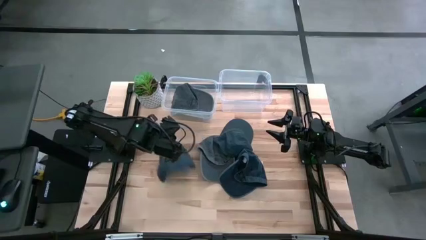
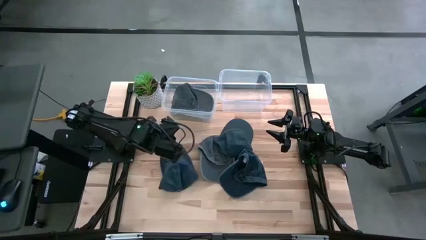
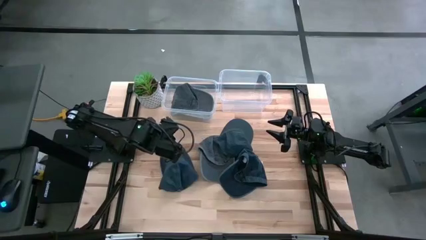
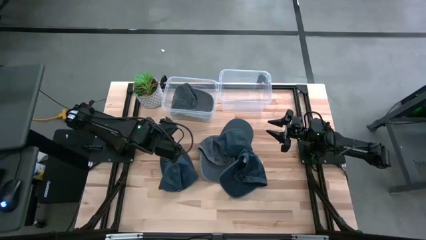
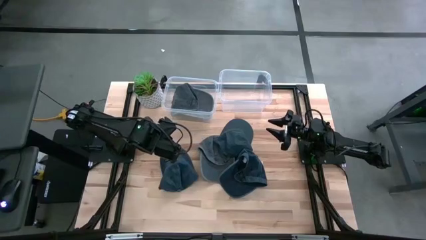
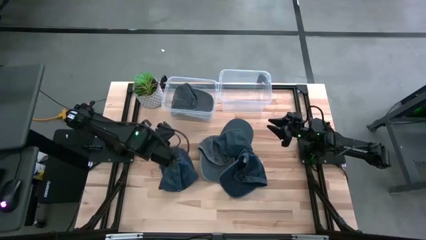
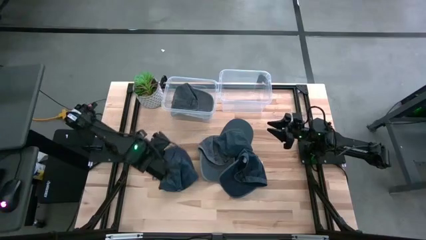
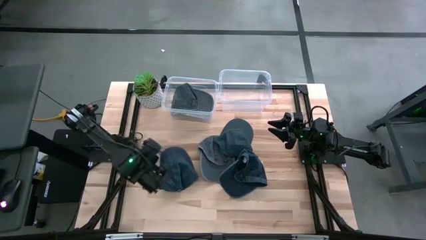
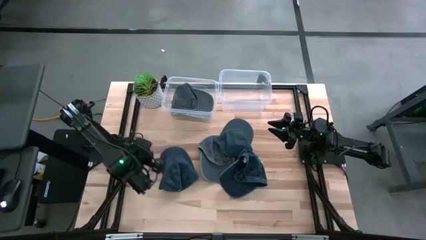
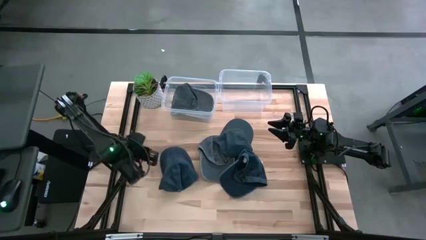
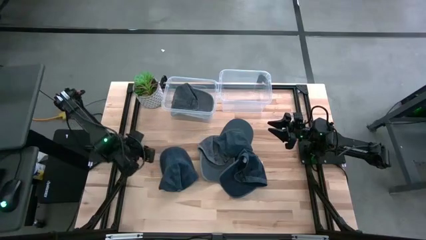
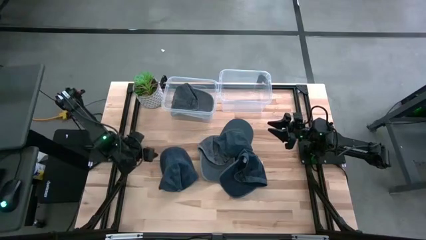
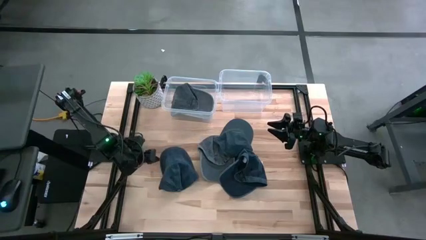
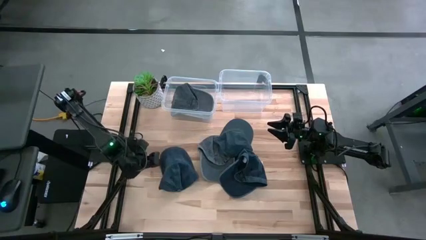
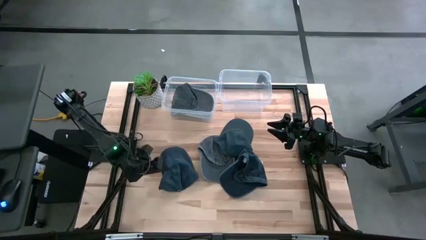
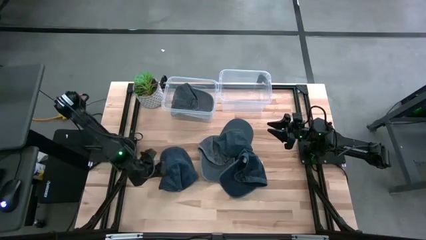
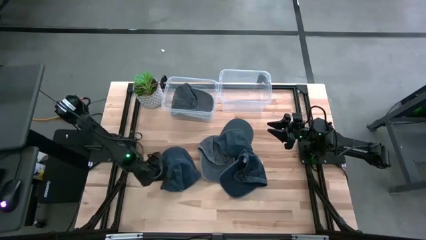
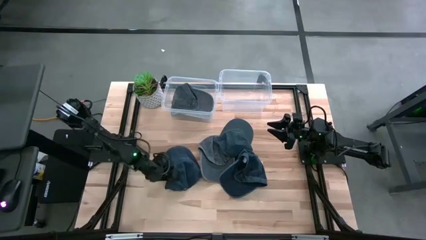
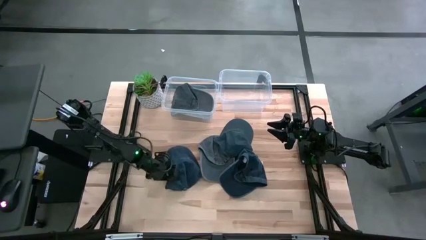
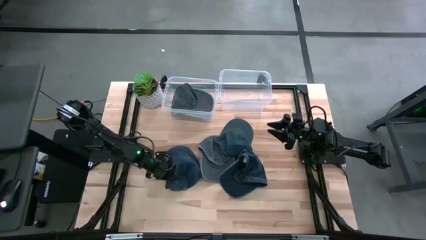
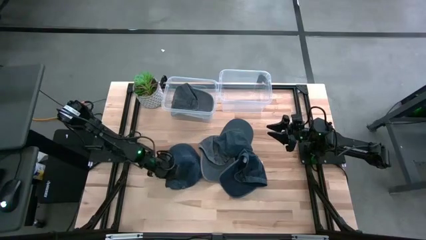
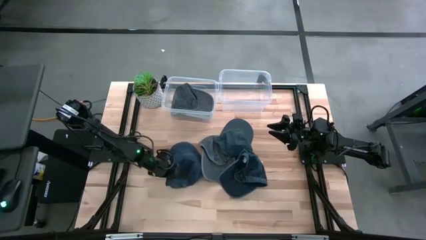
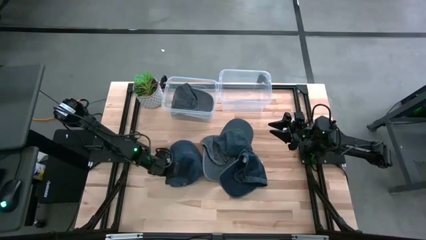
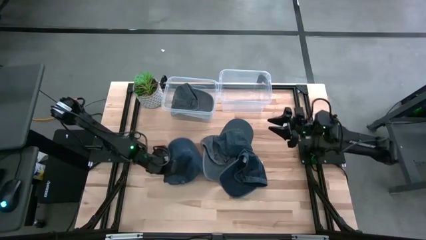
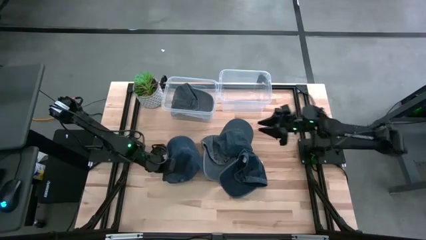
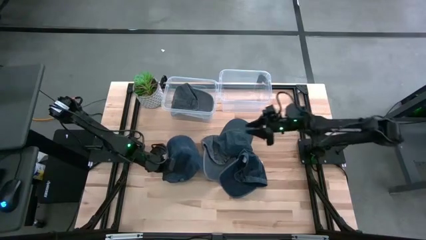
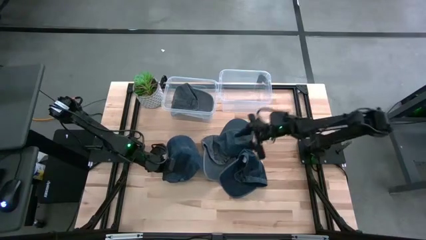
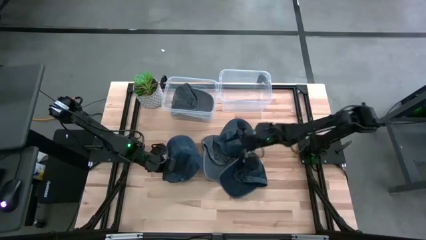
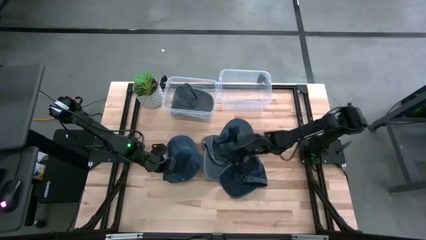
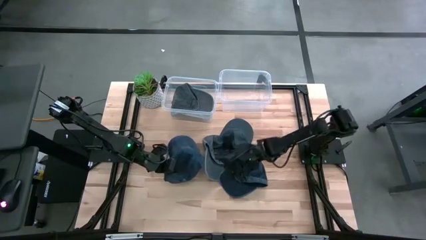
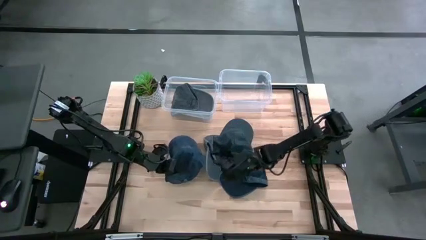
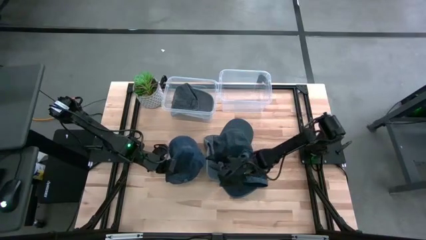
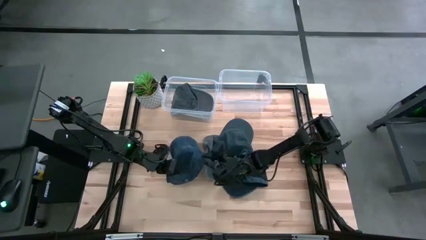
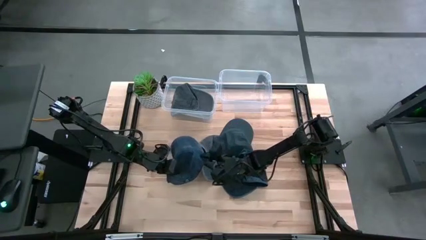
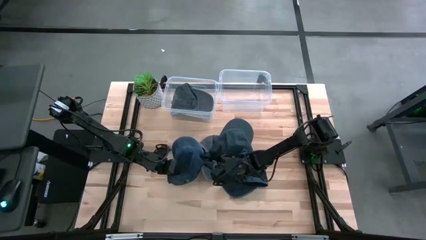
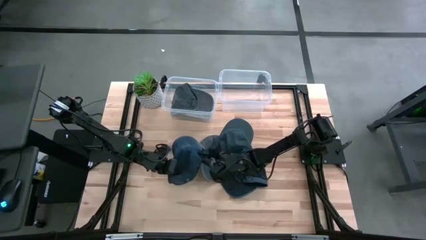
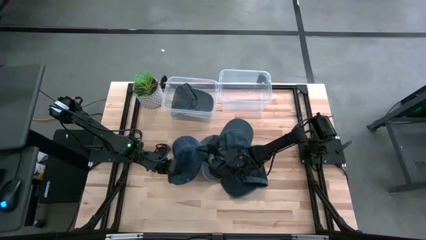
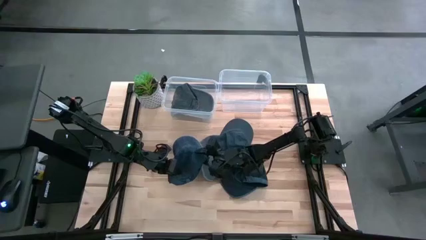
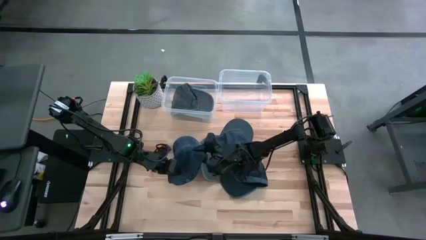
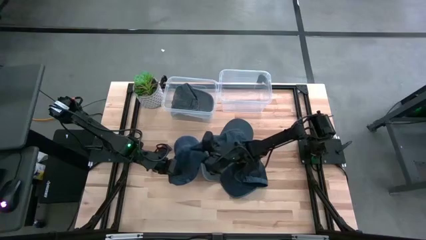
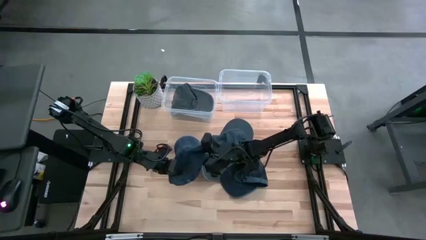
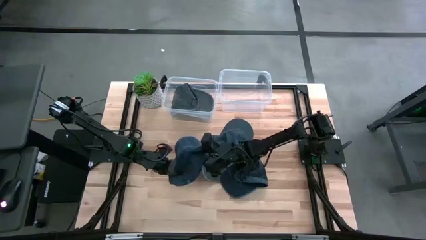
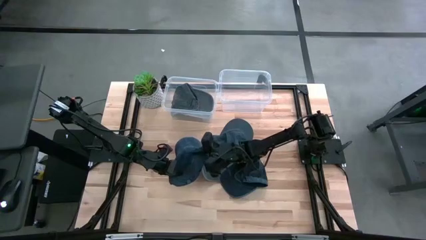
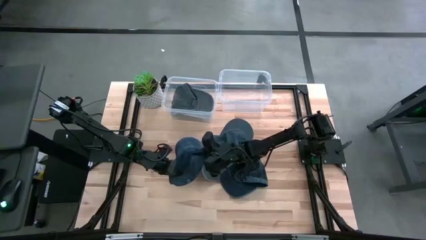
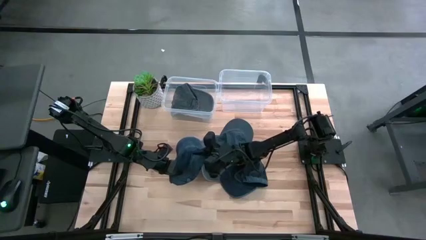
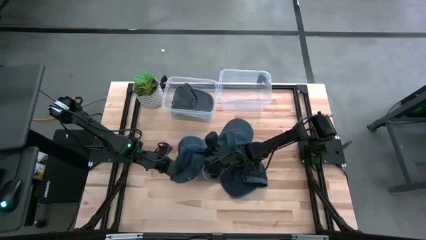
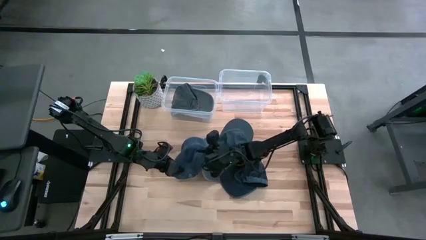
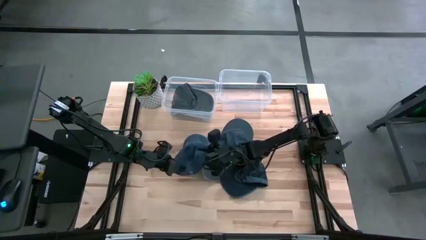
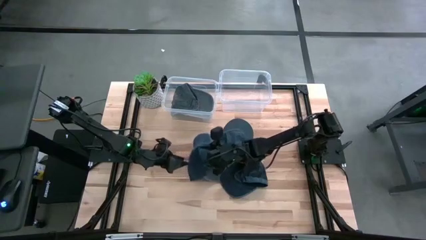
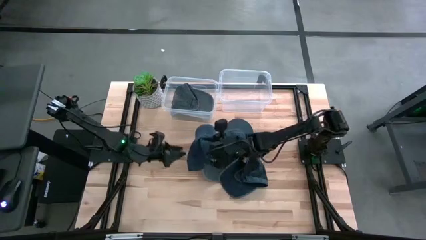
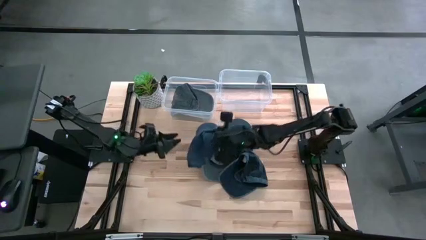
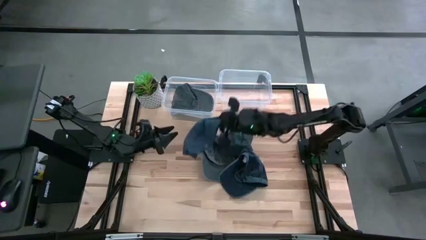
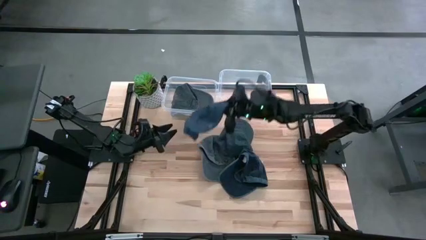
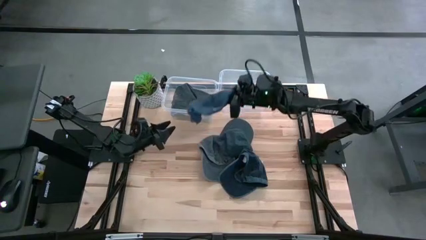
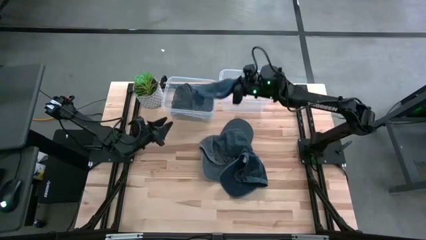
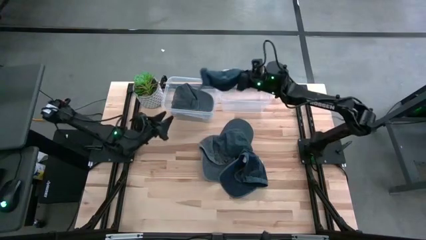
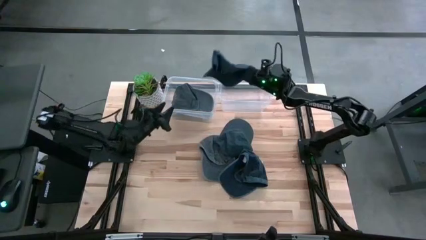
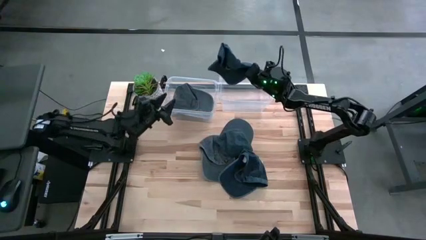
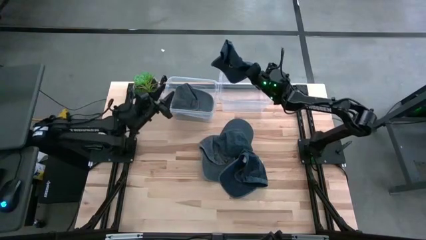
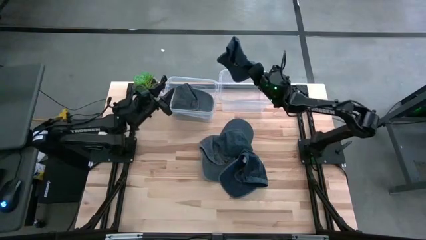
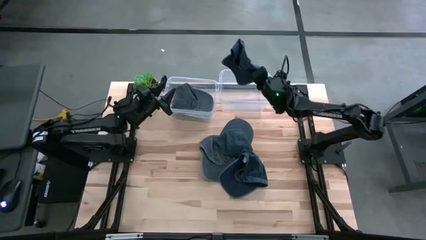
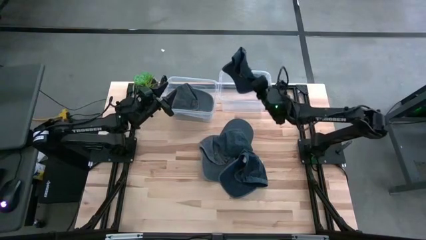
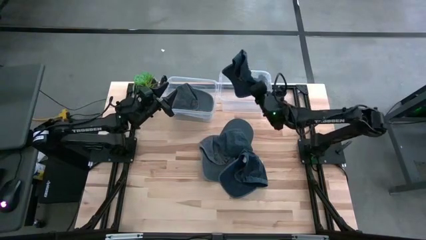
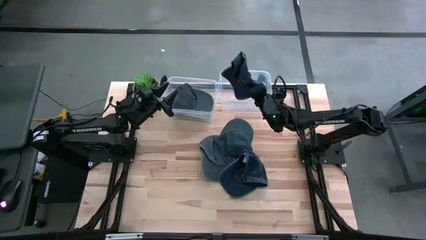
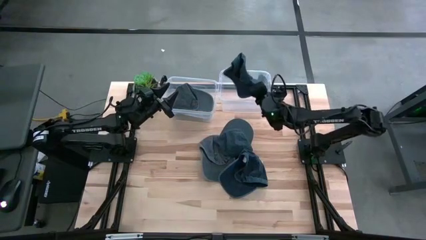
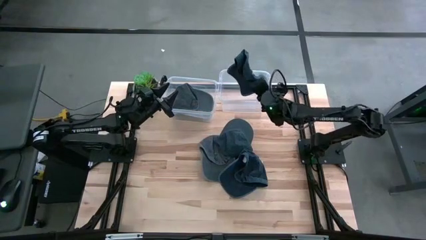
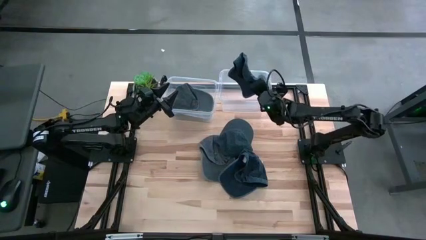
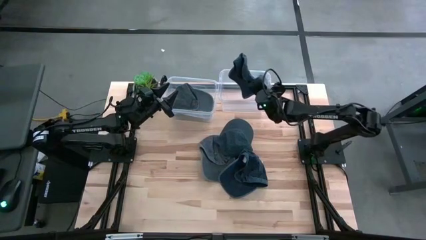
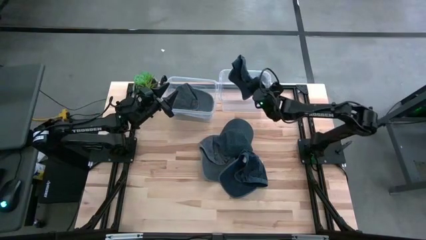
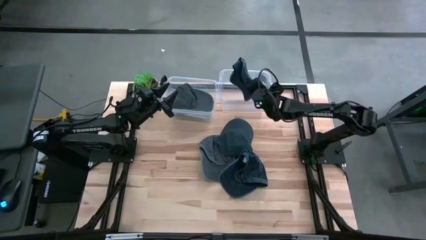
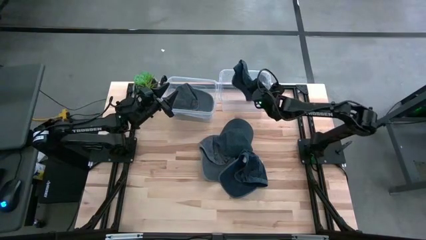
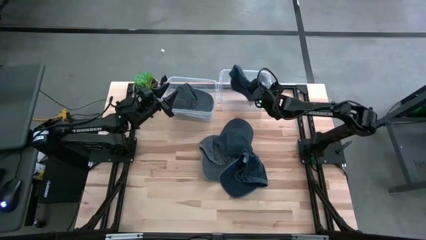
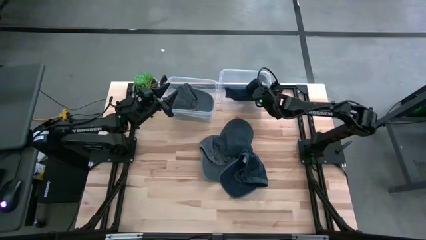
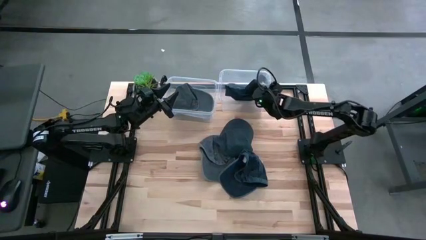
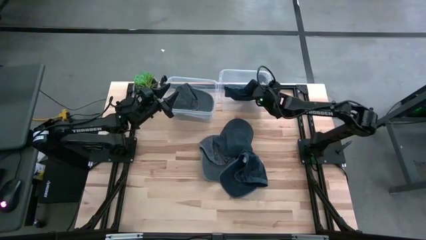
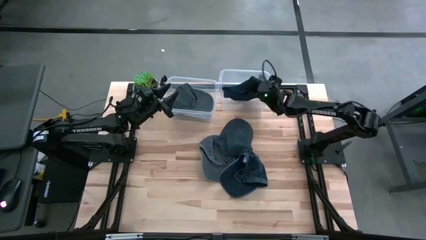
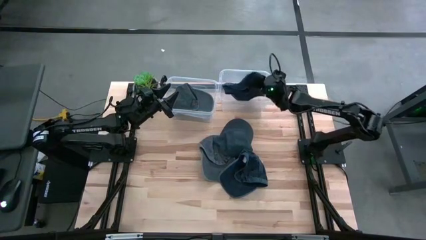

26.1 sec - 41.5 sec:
Task: Pick & Place hat
Put the middle left blue cap into the right transparent bin

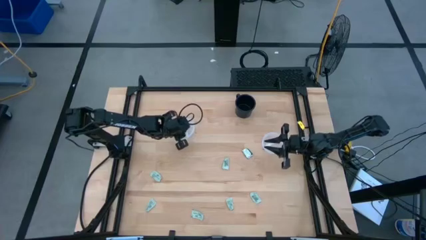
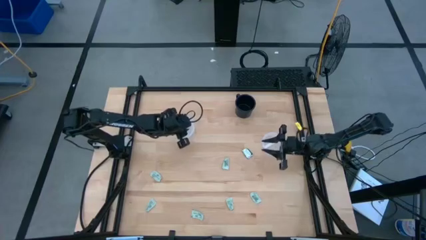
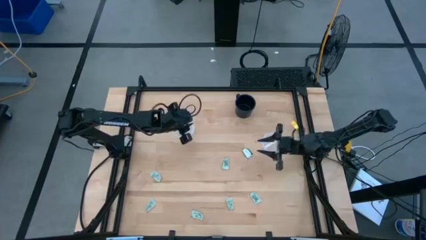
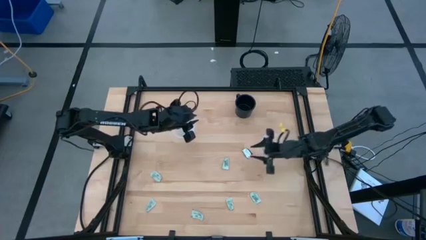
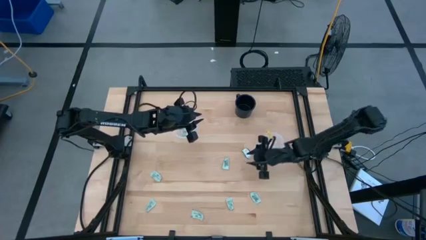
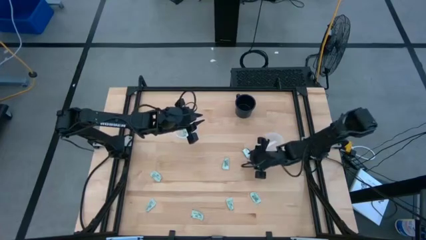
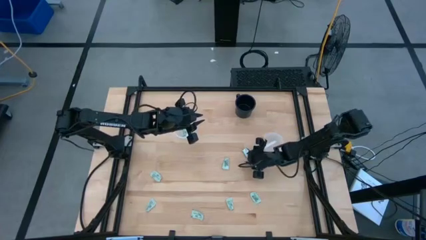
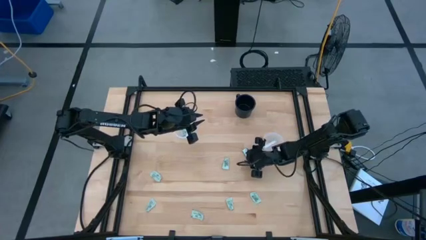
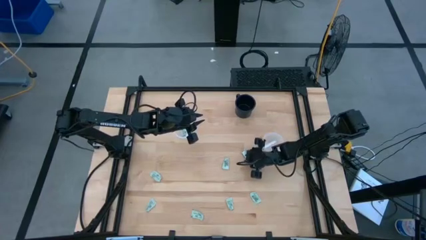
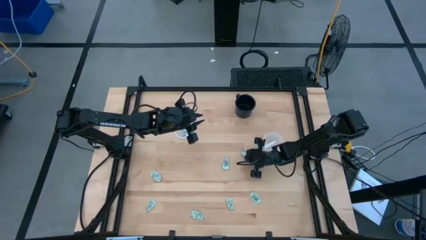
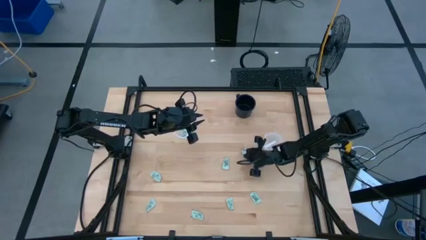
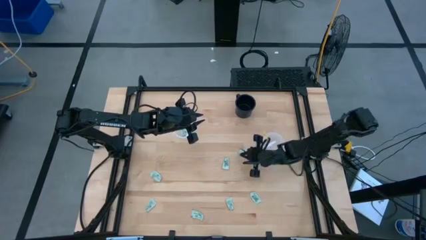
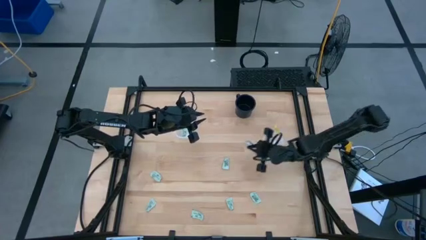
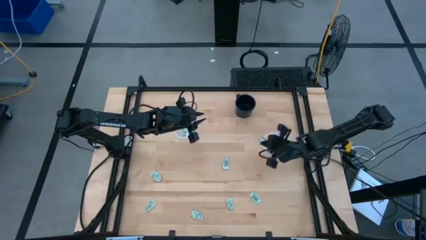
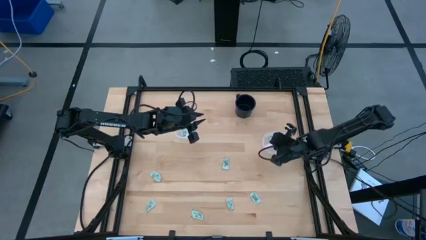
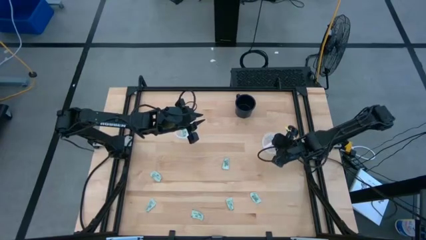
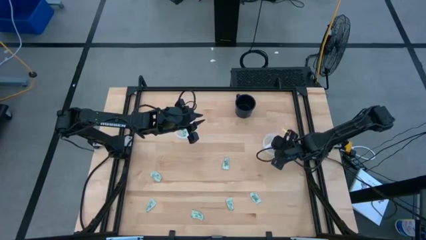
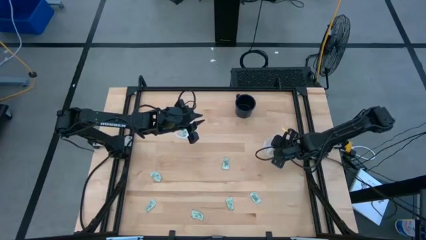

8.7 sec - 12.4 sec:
Task: Pick and place items into bin
Put the white brown stevia packet into the right transparent bin
